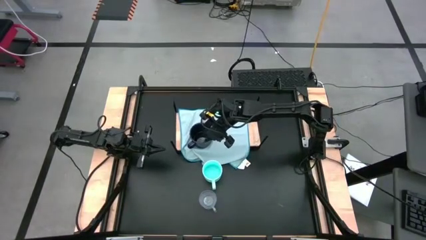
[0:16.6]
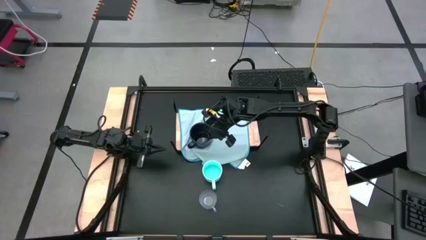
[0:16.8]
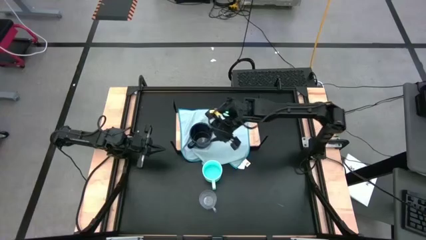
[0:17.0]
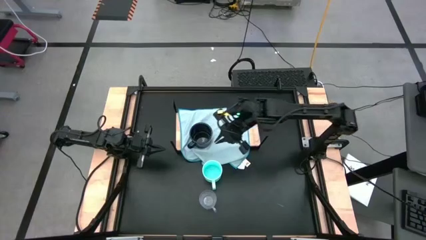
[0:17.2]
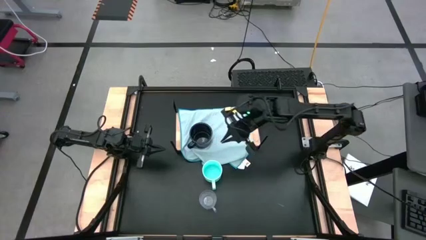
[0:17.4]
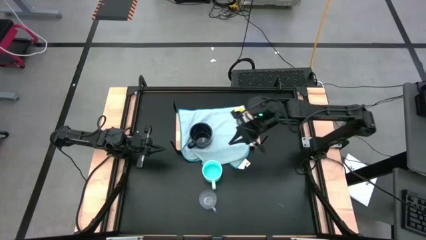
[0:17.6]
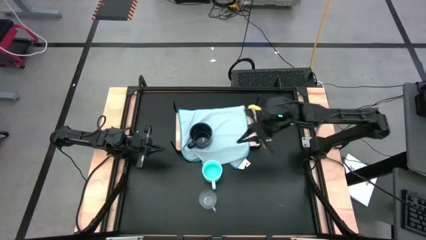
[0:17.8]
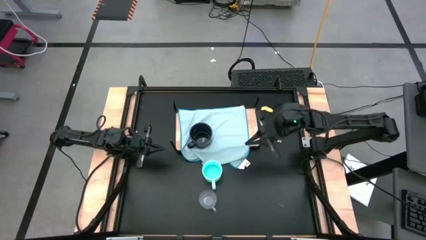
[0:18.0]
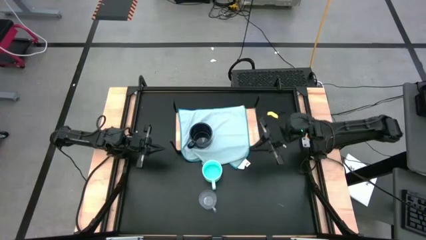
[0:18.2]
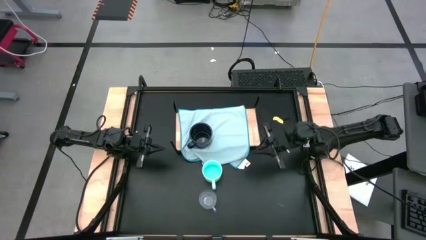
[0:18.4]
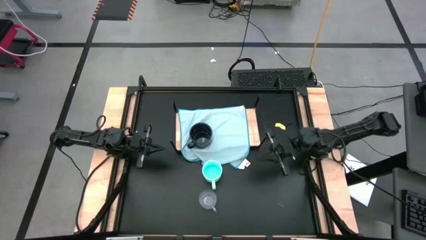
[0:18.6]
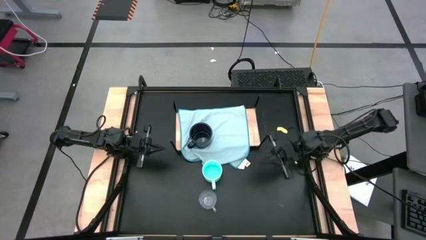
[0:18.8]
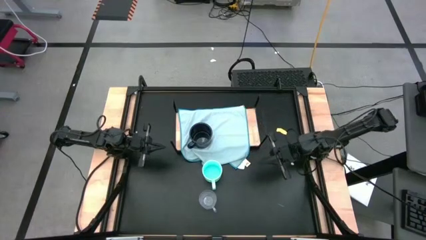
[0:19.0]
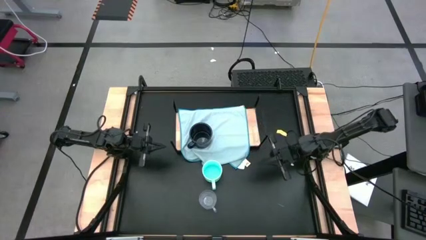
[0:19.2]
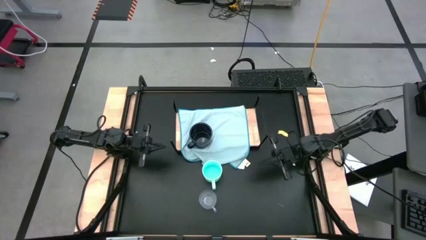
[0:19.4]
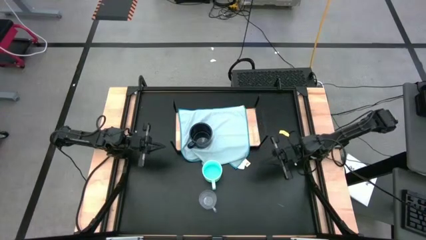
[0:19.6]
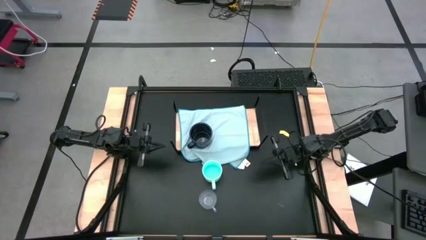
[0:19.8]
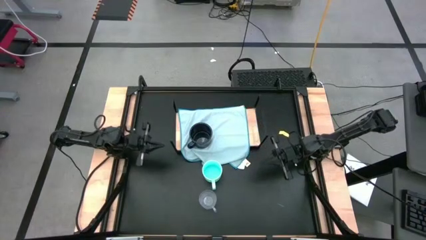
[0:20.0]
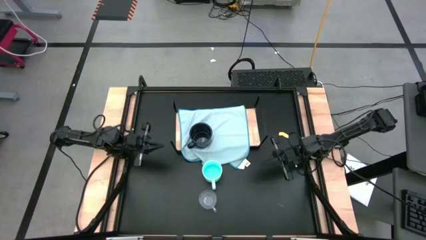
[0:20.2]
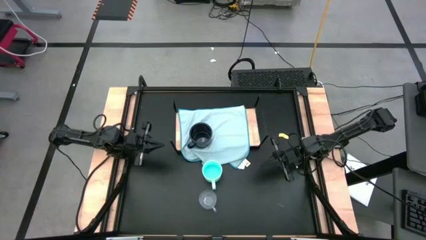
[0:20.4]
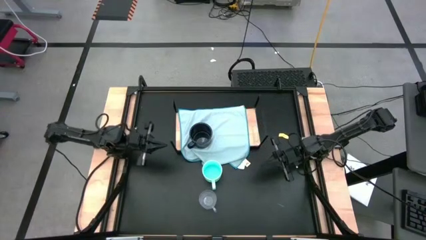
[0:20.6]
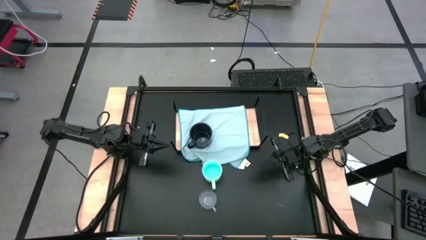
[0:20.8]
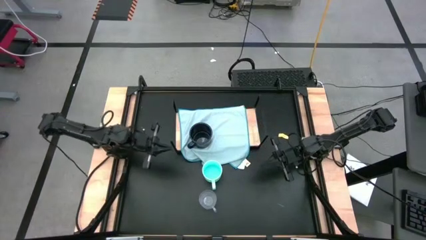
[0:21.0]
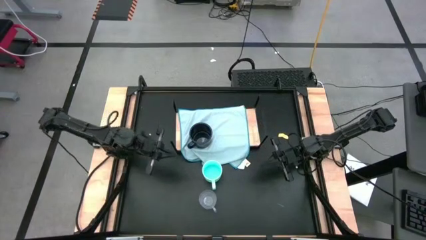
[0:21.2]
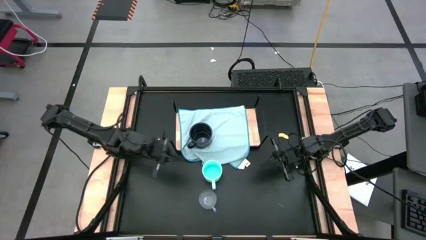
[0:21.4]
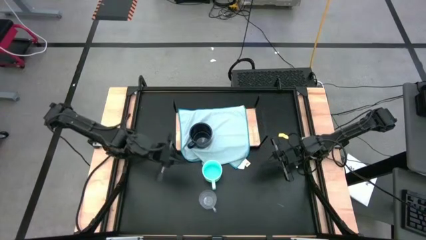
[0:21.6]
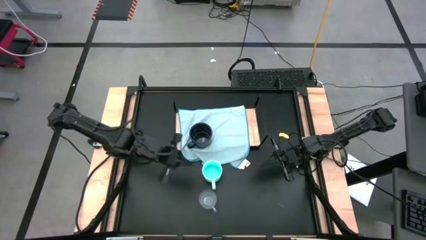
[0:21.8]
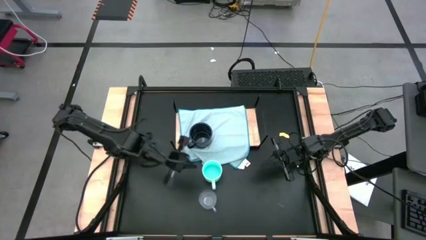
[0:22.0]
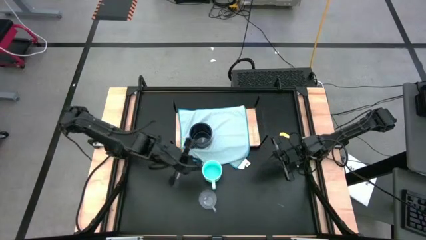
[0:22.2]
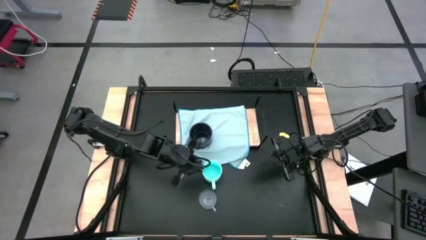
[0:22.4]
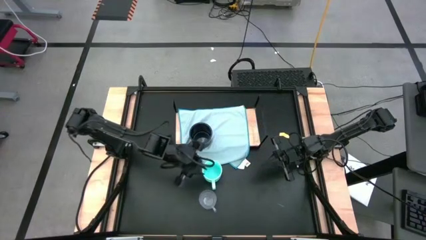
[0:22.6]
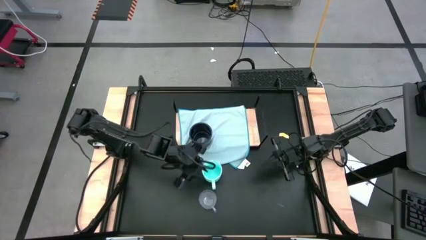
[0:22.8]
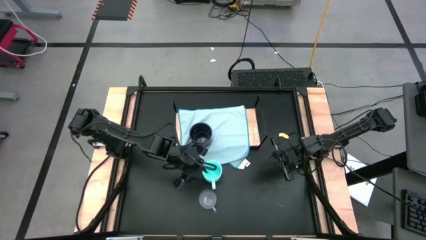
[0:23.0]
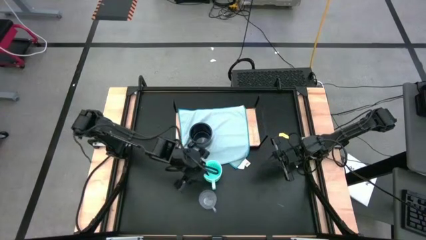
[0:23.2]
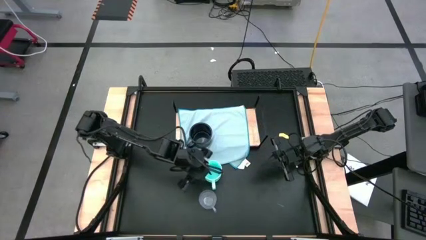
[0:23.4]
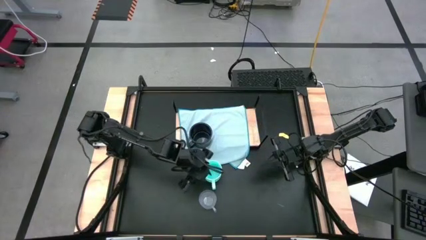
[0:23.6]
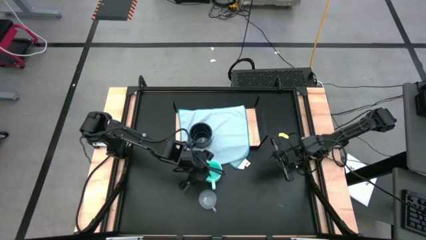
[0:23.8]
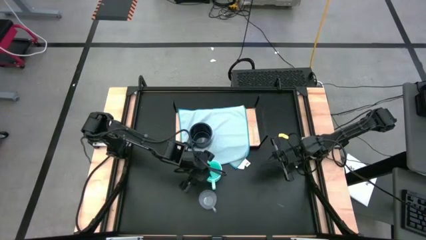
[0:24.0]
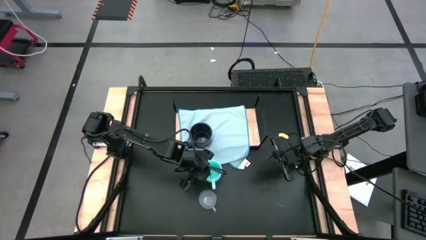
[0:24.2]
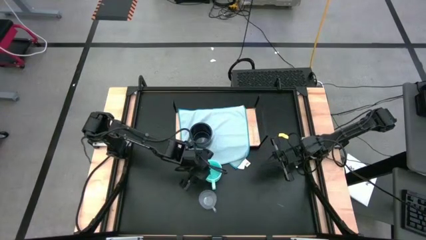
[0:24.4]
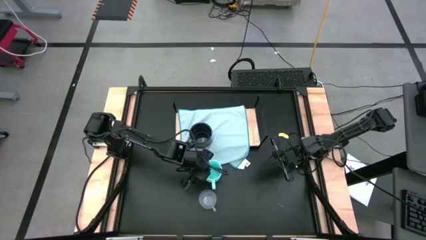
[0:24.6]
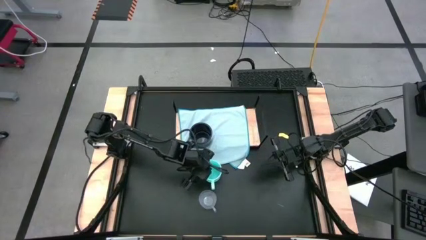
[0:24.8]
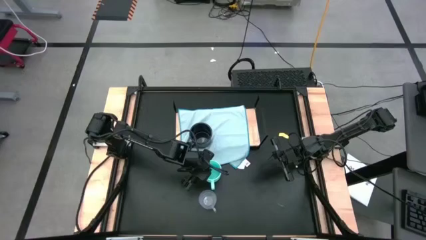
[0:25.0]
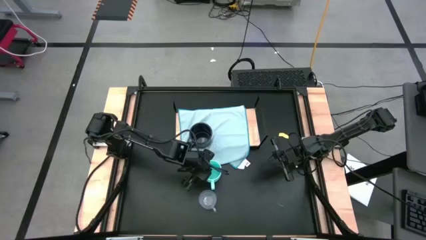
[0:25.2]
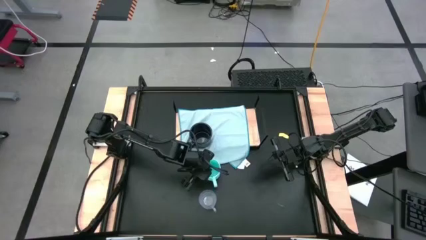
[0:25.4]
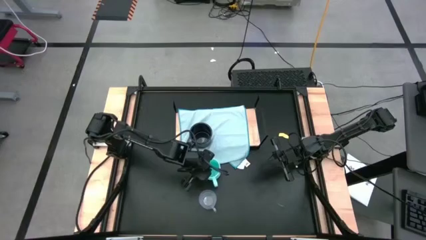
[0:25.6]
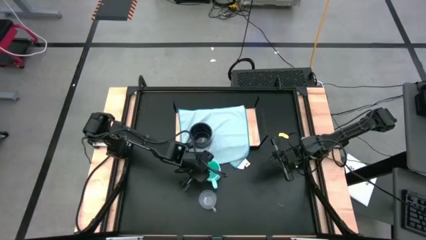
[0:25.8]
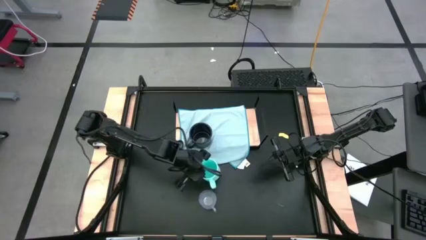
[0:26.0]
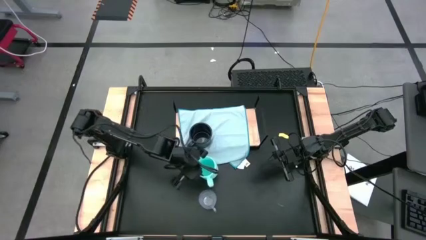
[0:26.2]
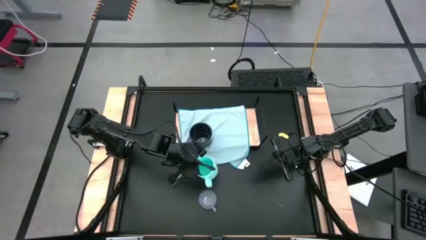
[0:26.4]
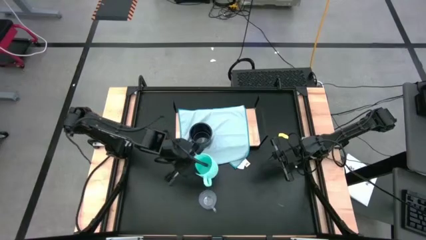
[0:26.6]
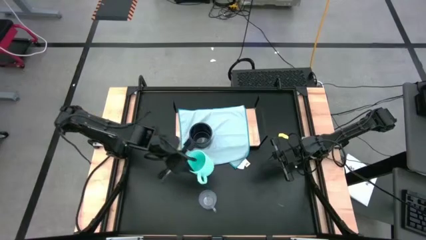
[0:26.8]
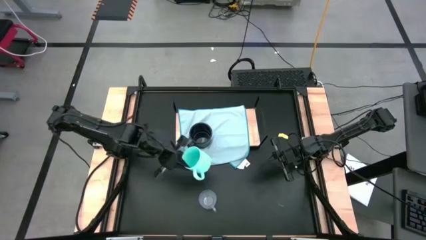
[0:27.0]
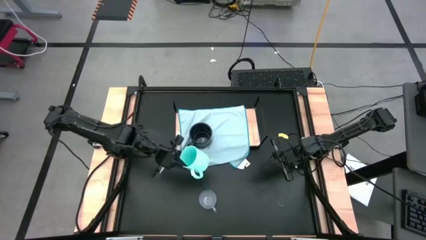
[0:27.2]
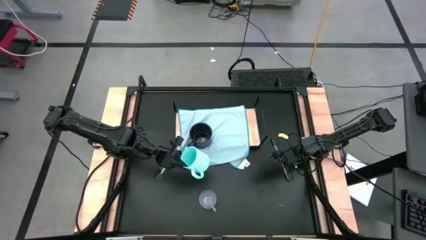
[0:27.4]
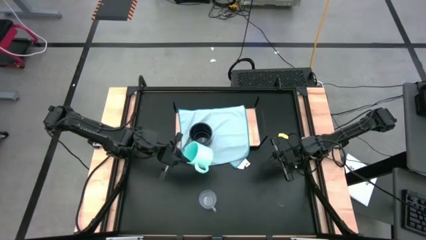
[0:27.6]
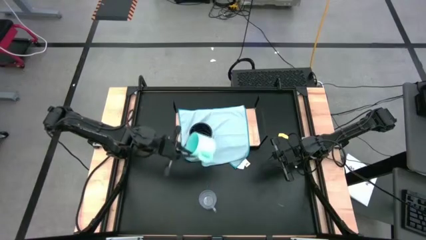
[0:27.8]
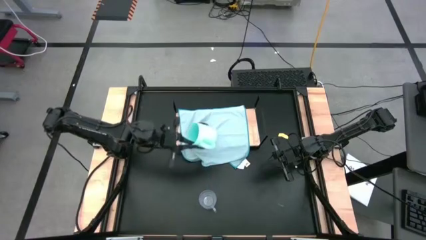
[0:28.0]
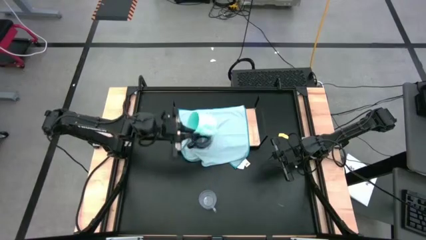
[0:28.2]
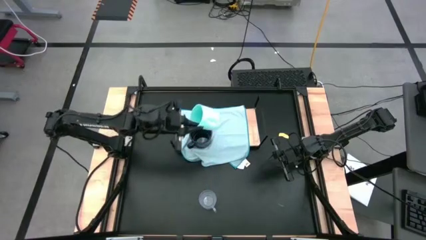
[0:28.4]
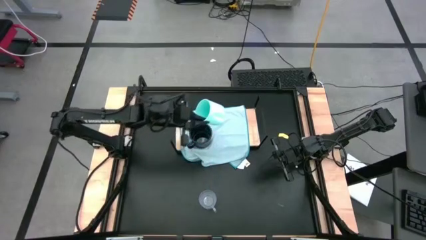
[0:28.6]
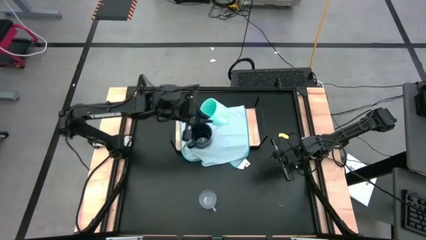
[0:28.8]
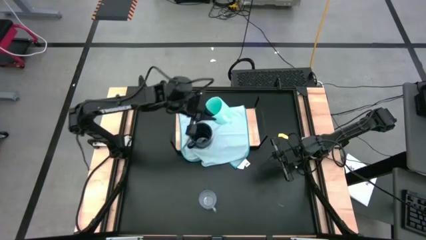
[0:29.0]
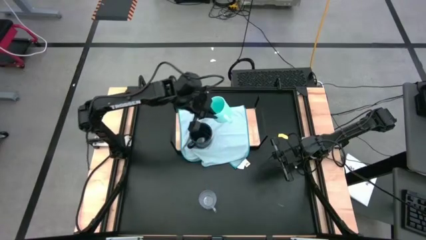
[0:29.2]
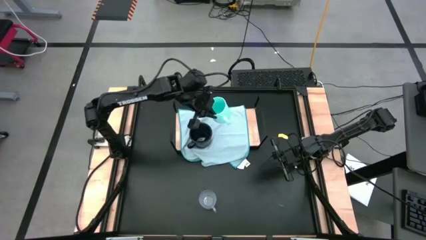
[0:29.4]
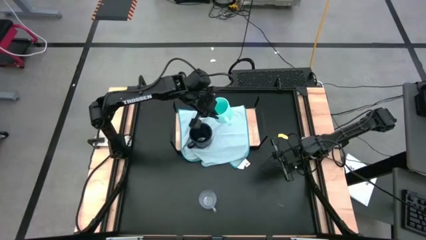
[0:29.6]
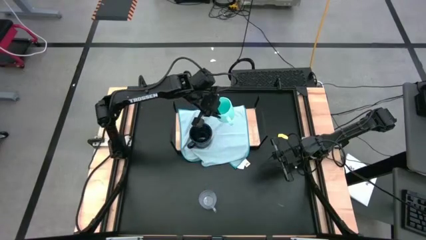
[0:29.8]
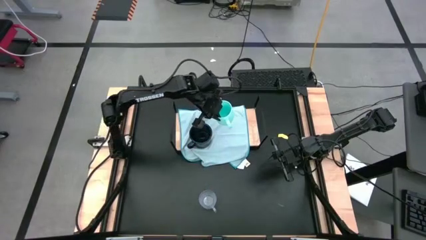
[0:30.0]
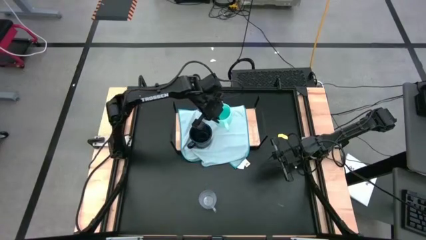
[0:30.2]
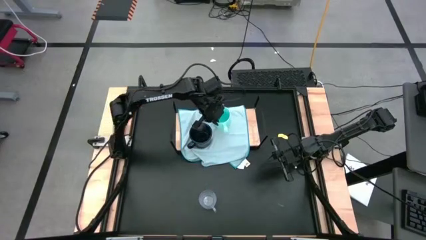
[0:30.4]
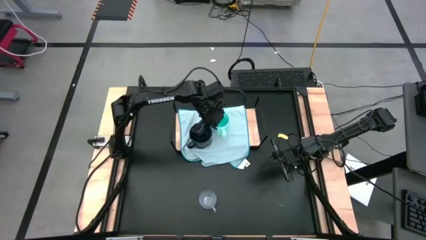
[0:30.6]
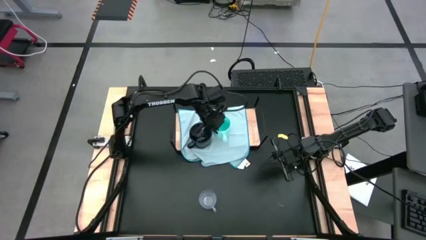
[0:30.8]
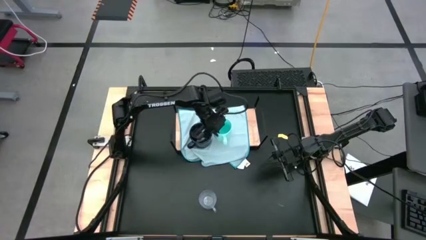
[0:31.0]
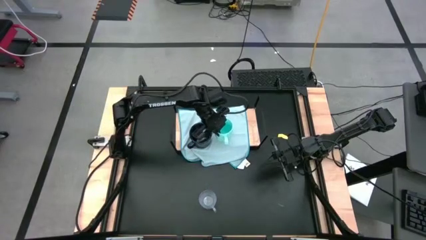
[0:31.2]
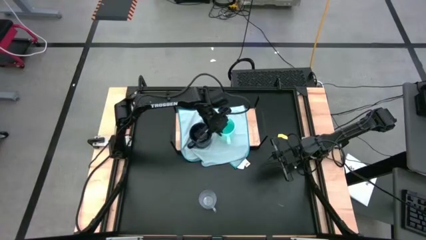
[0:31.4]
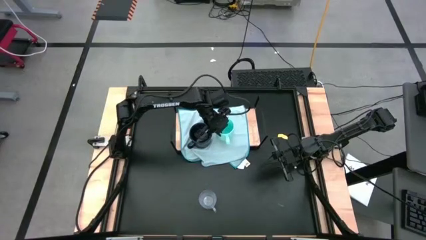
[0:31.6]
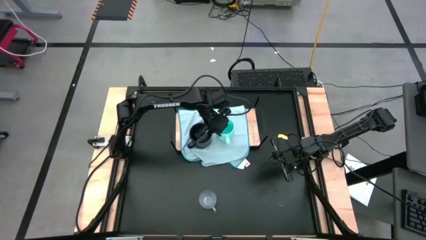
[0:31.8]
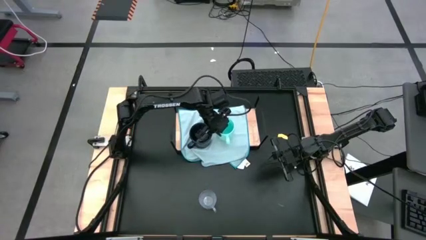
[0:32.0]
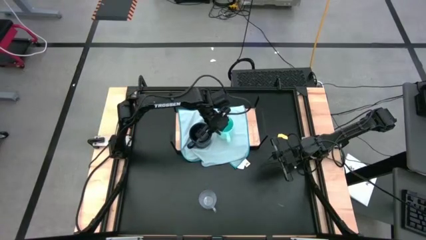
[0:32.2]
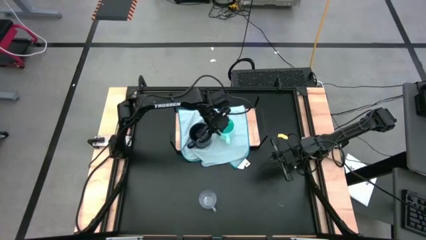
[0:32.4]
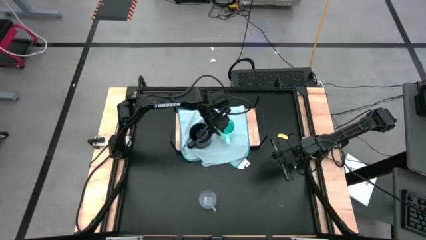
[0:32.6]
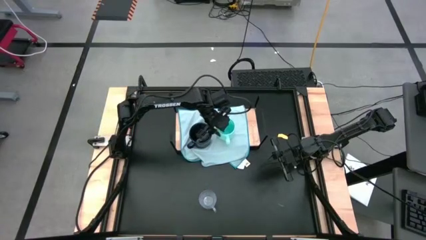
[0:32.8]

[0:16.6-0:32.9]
Task: Stack small to large cups/mugs on shelf
Put the light blue mug on the microfiber cloth on the shelf
